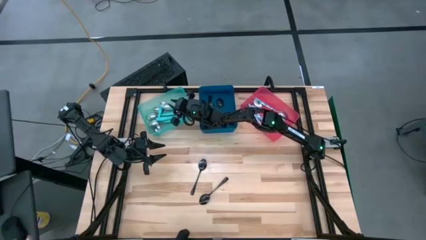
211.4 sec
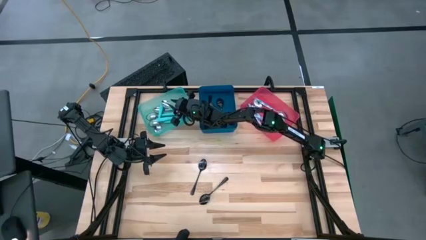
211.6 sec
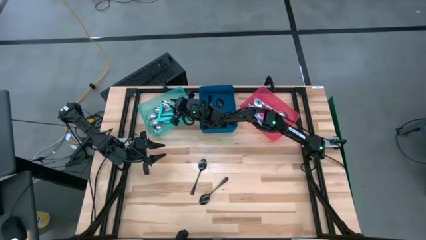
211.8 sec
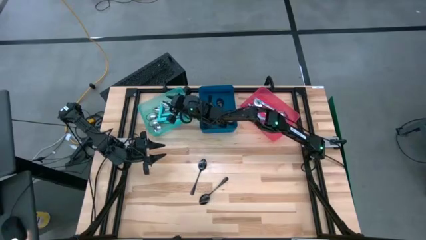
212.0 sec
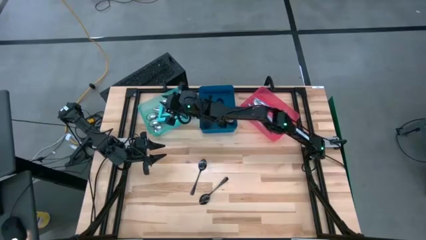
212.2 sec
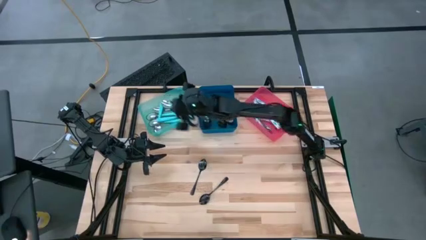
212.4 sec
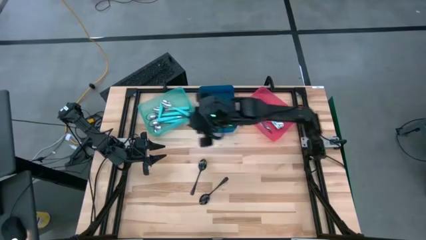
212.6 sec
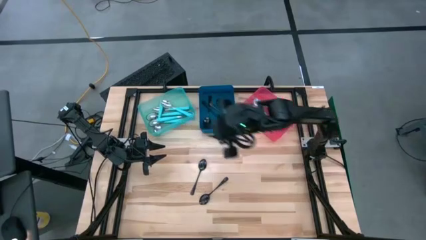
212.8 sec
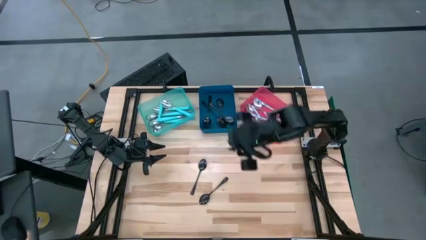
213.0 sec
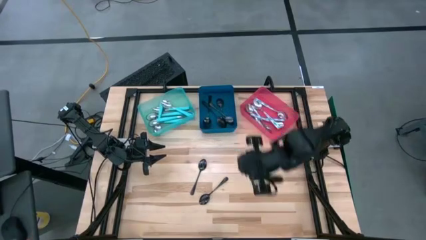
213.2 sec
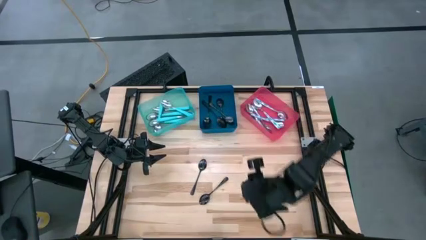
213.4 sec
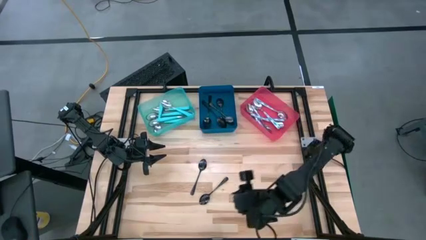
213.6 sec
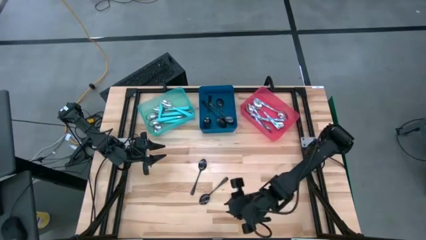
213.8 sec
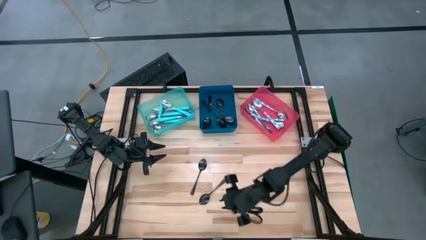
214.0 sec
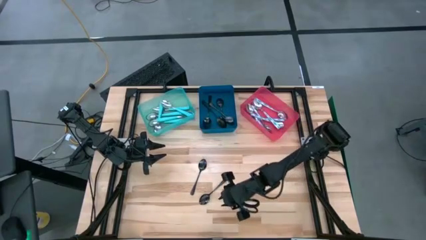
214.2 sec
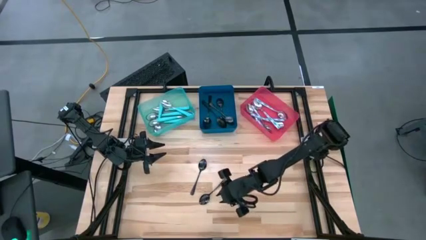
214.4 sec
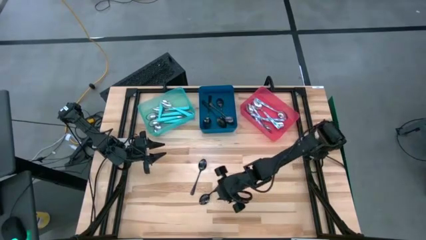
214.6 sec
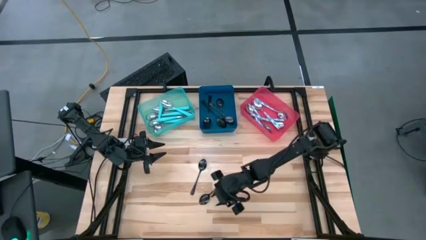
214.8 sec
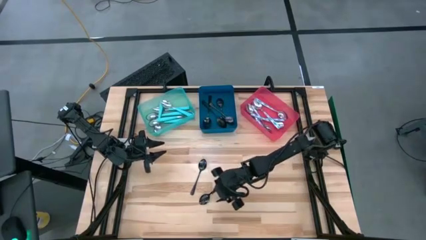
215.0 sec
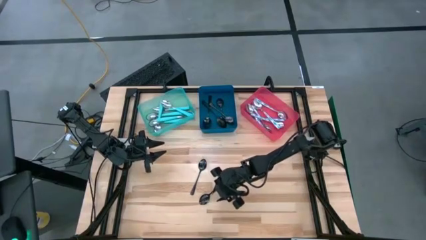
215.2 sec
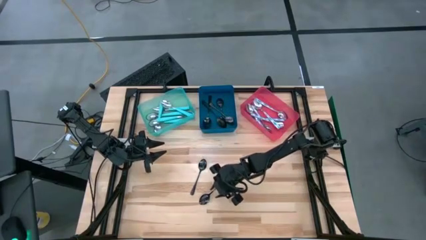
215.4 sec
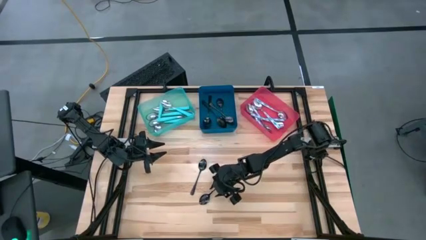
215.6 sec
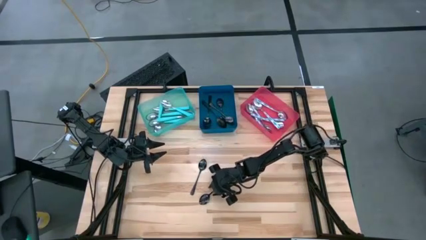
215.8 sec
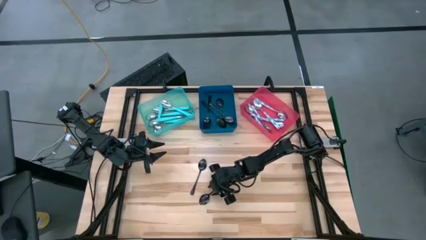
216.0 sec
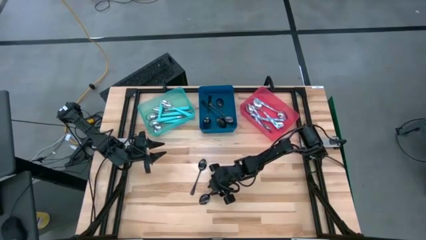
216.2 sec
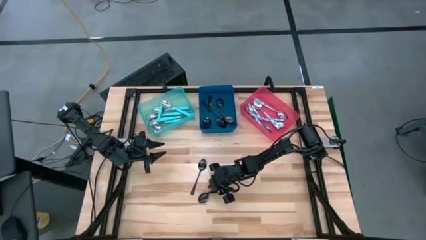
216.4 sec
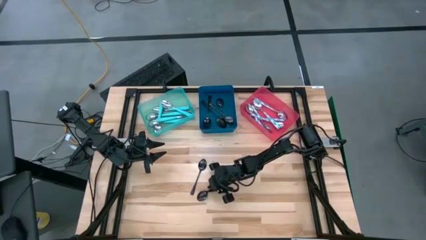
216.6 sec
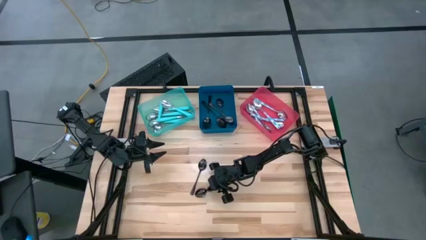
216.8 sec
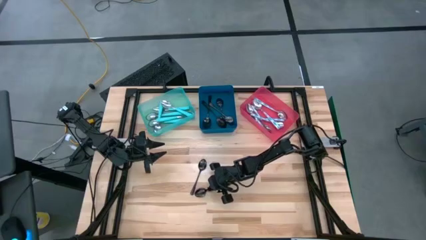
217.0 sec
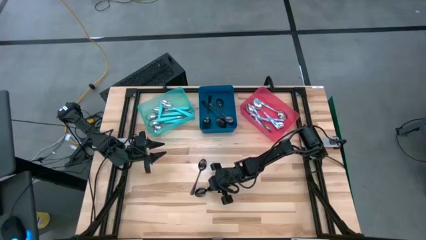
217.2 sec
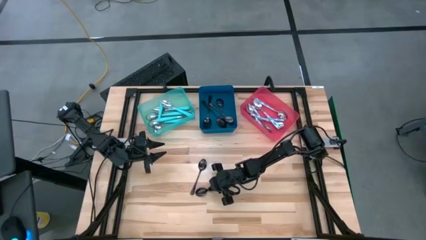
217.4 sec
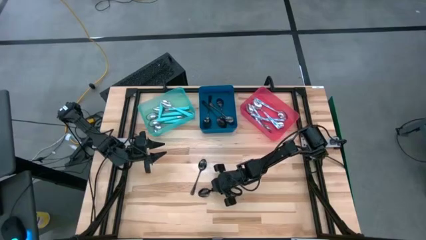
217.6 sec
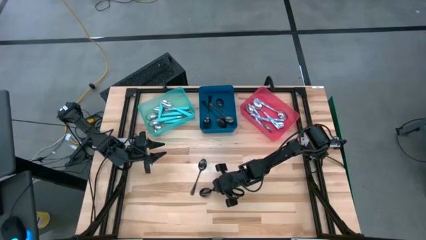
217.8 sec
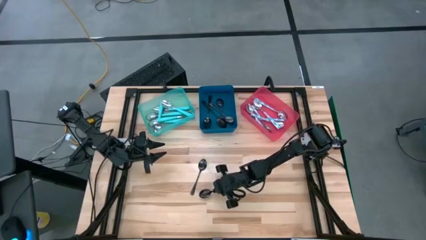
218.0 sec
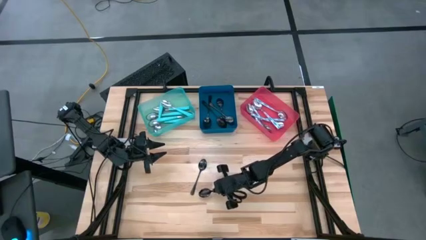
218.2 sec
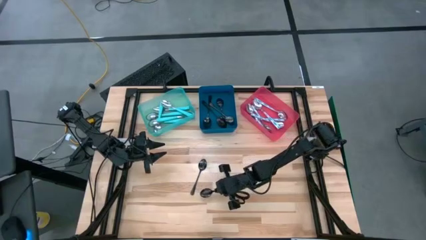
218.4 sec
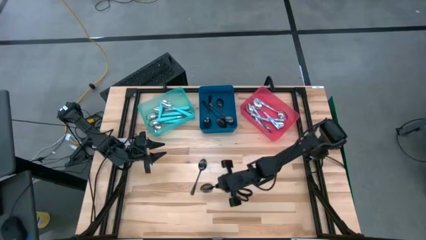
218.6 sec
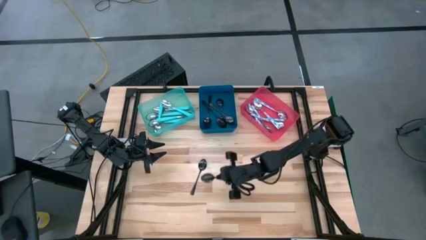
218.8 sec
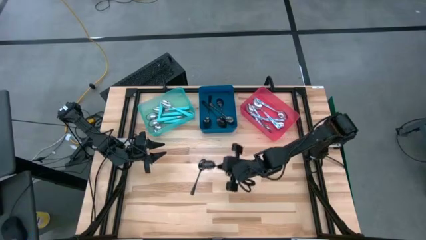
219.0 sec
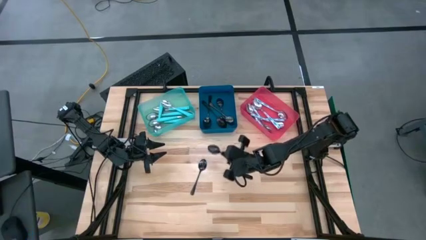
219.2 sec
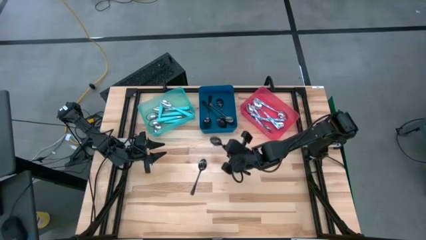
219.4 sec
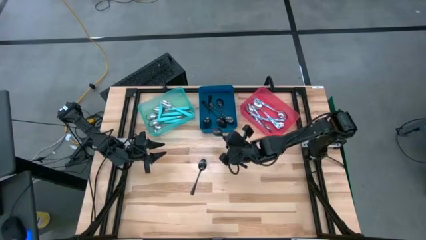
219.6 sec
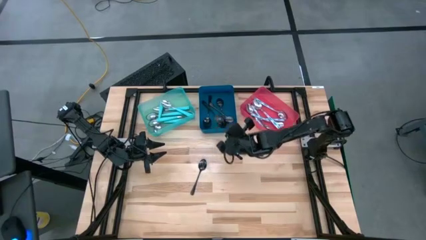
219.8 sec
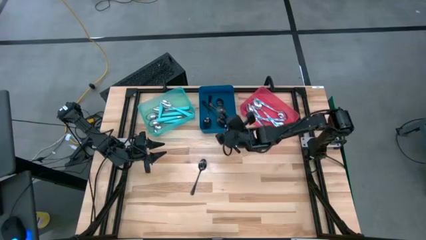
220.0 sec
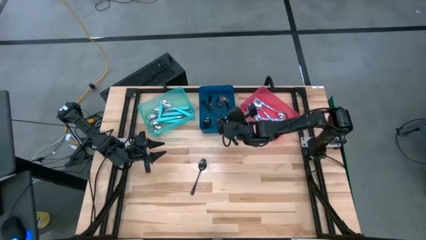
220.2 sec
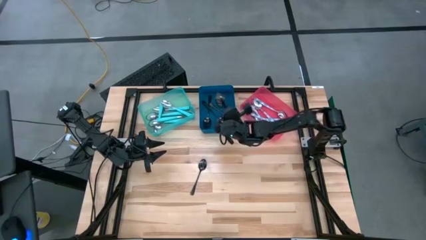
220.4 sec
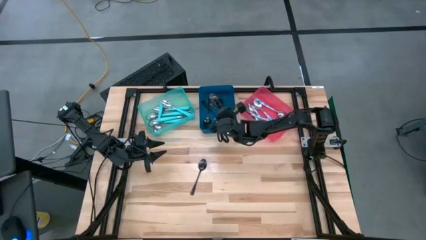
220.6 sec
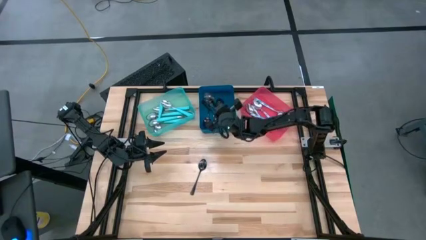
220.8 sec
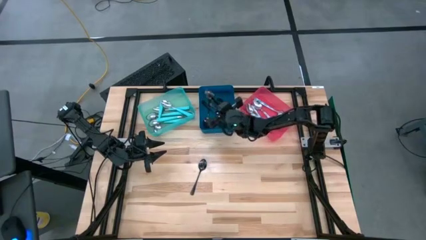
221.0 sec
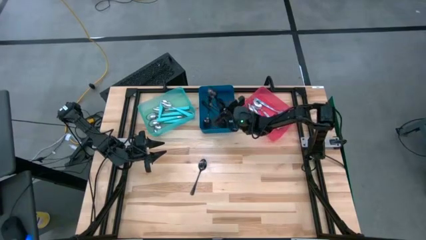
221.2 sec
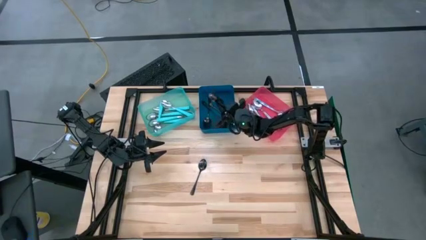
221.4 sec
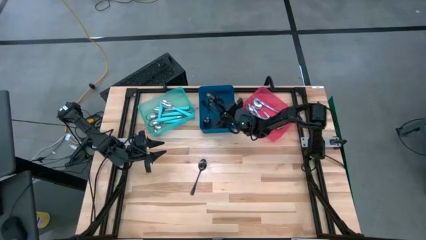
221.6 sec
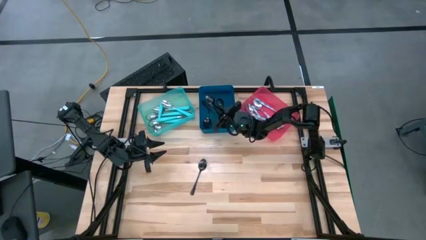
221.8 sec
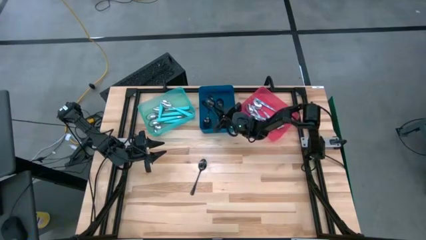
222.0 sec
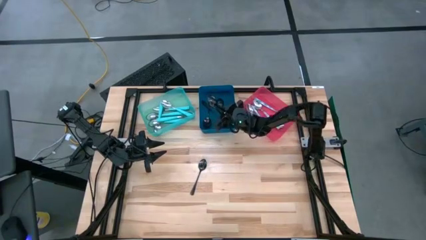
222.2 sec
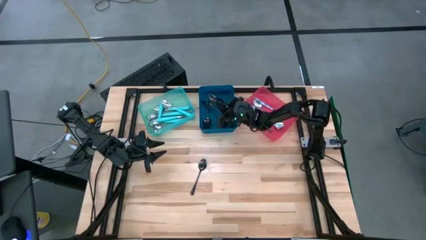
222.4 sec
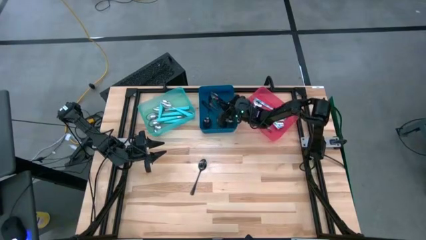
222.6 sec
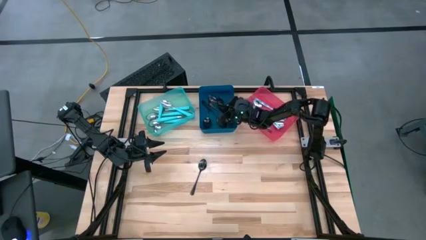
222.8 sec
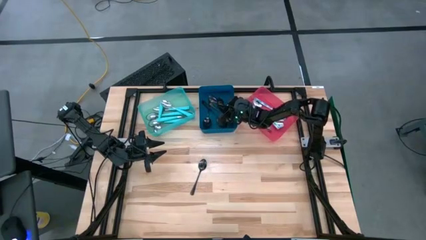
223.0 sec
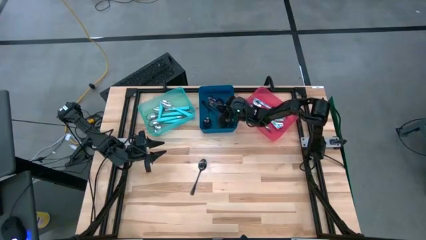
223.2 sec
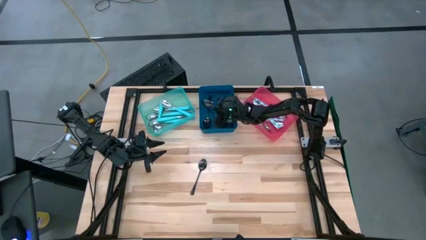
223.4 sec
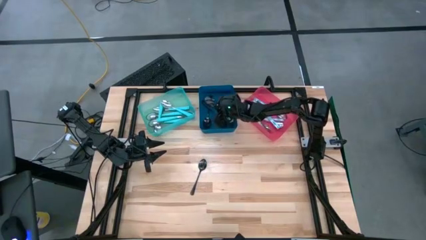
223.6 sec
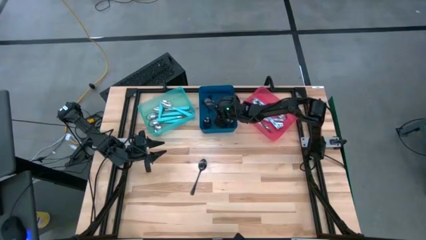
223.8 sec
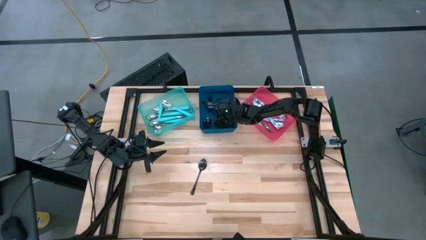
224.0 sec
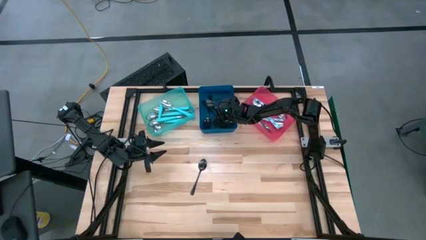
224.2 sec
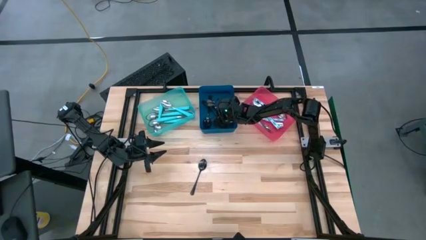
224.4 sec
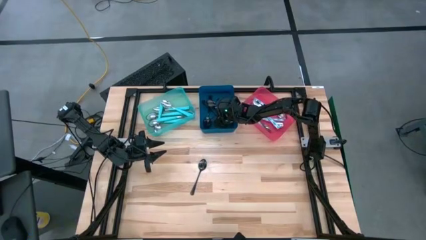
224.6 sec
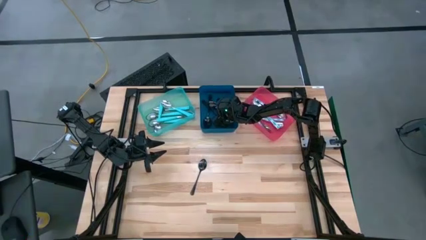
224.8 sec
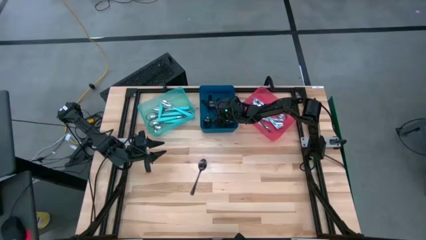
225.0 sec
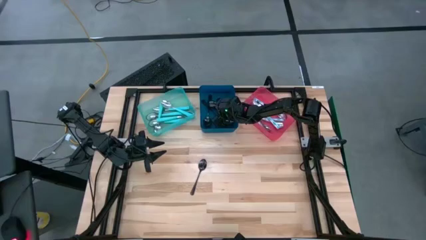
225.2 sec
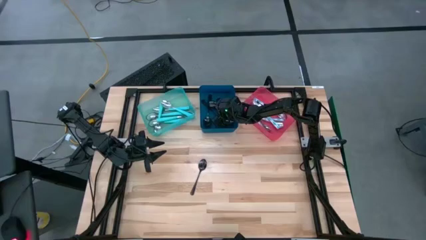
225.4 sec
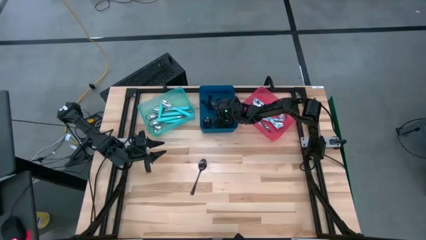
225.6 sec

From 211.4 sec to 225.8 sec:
Task: Sort silverware by color (type)
Put the black spoon into the blue bin
